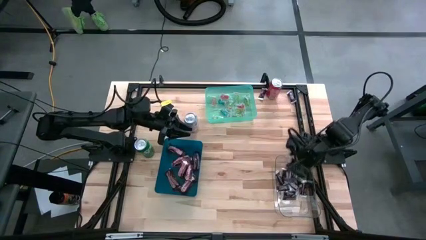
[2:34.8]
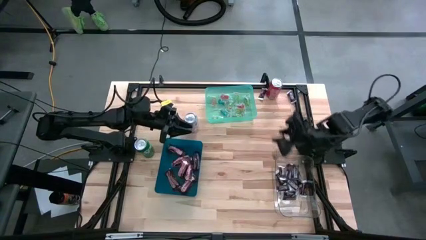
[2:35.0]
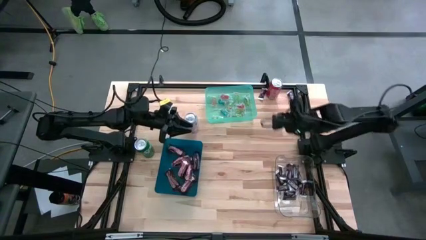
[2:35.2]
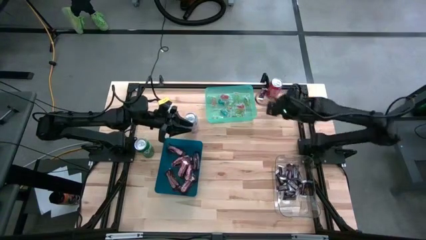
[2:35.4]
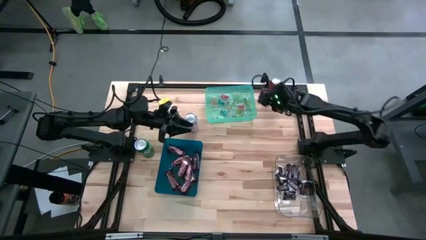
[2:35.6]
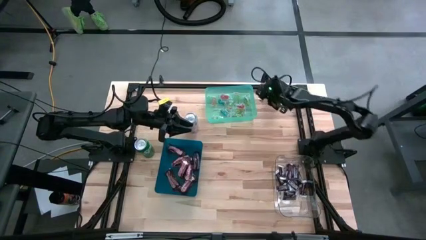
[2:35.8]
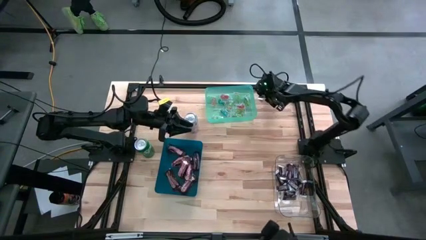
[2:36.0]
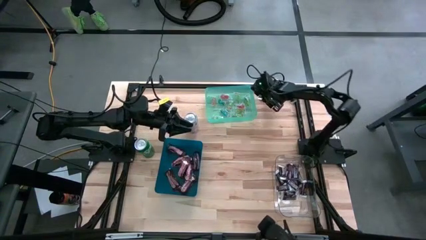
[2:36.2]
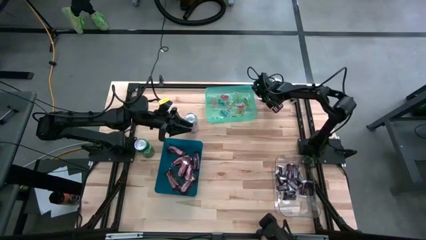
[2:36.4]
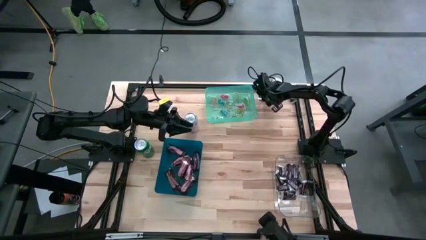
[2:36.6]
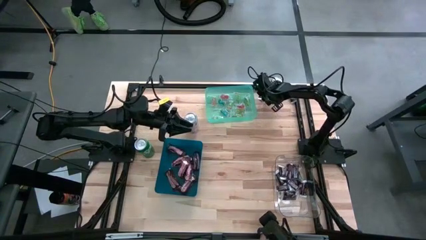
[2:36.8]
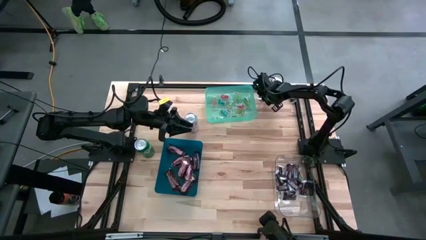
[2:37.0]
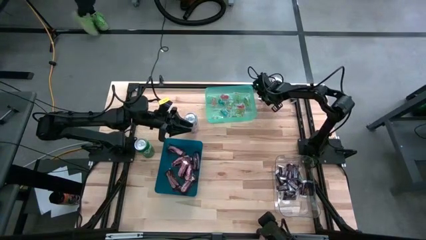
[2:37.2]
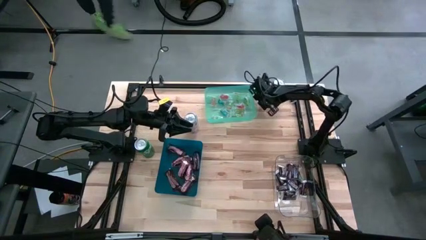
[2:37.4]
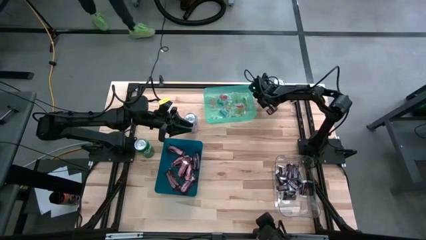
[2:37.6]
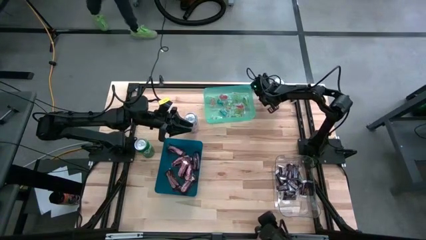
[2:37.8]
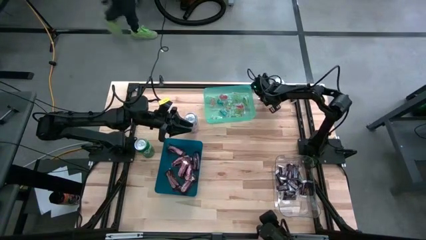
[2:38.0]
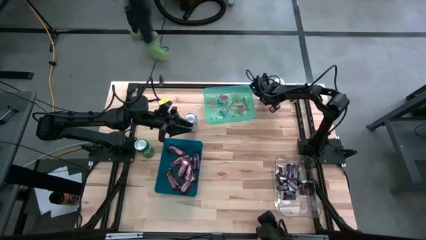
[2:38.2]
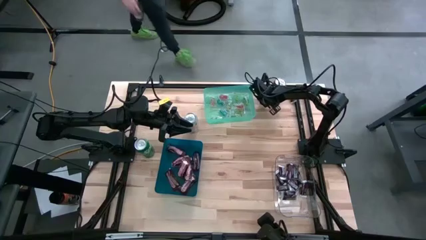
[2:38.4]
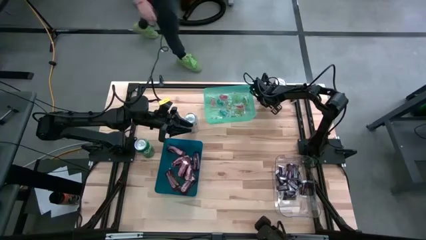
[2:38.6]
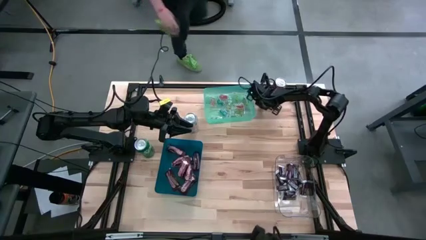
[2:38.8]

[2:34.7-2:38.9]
Task: Organize candy in baskets
Put the dark brown chocolate bar into the transparent bin

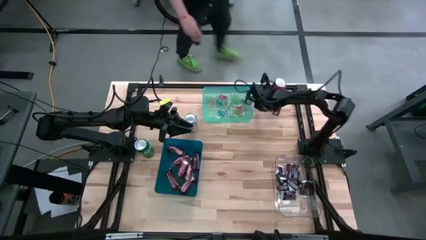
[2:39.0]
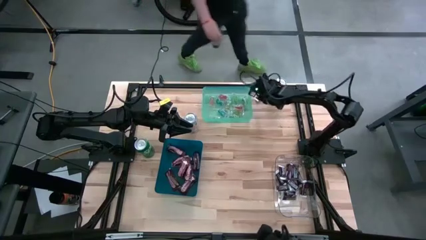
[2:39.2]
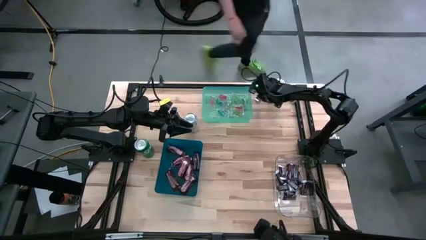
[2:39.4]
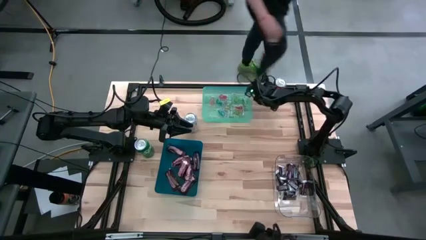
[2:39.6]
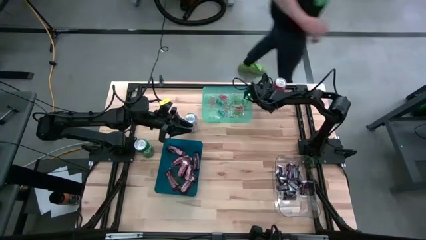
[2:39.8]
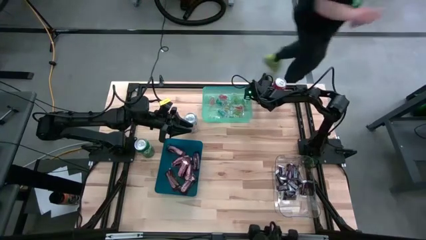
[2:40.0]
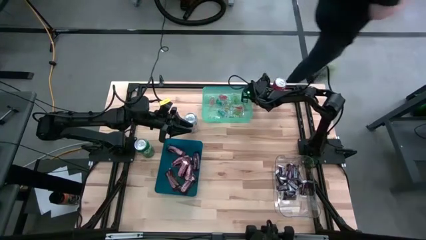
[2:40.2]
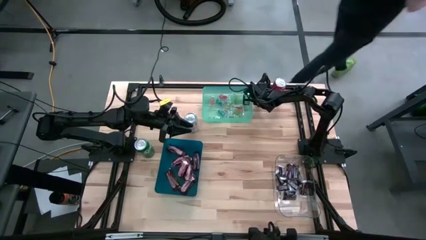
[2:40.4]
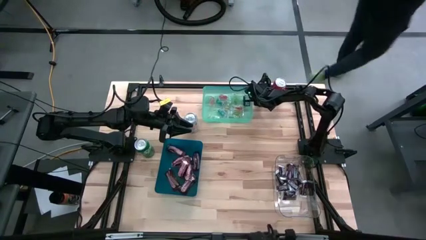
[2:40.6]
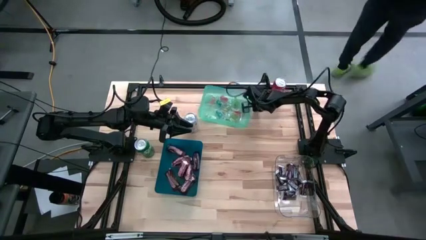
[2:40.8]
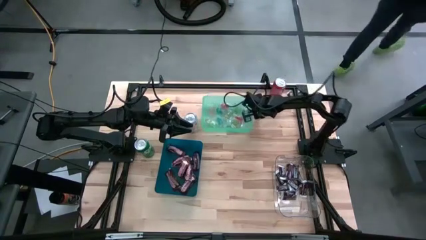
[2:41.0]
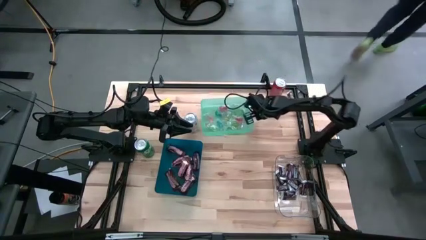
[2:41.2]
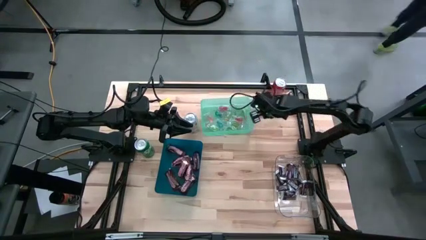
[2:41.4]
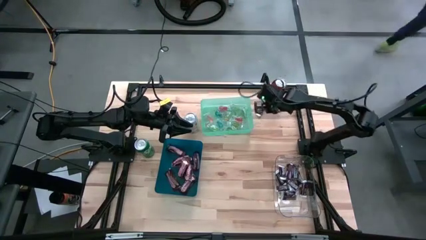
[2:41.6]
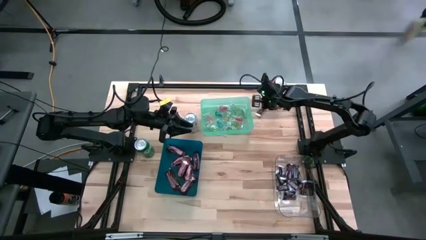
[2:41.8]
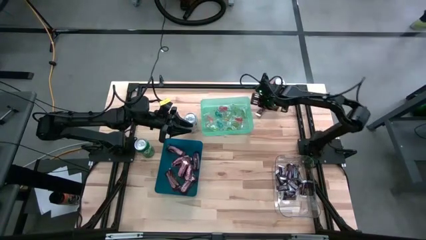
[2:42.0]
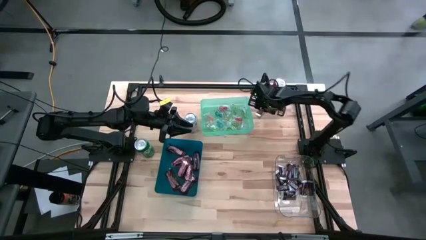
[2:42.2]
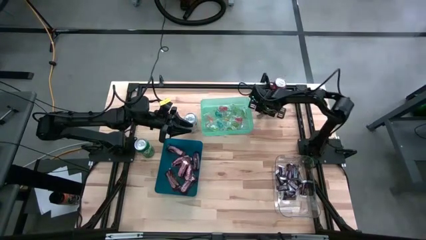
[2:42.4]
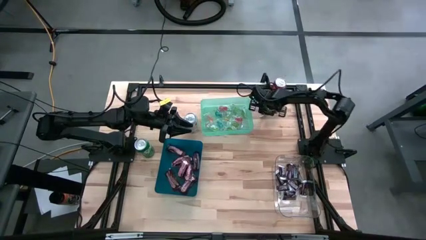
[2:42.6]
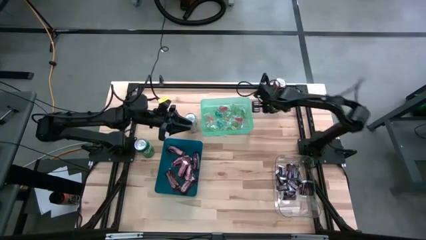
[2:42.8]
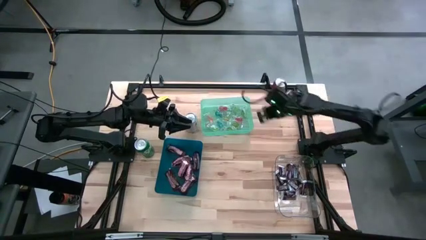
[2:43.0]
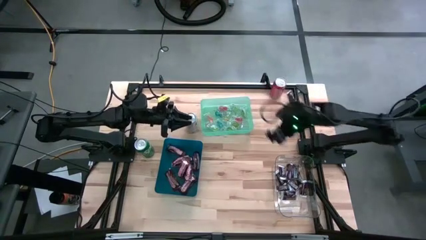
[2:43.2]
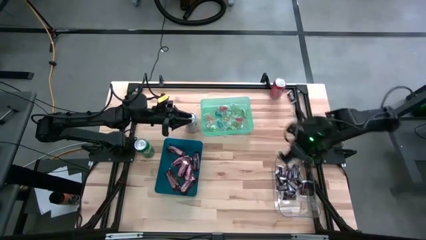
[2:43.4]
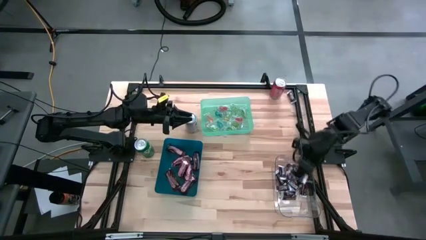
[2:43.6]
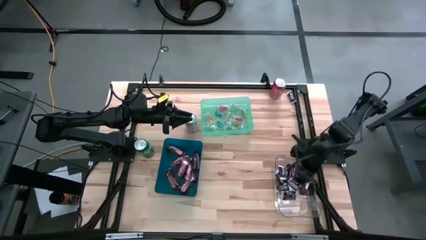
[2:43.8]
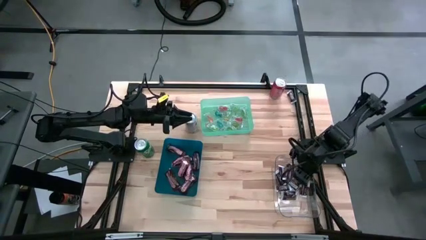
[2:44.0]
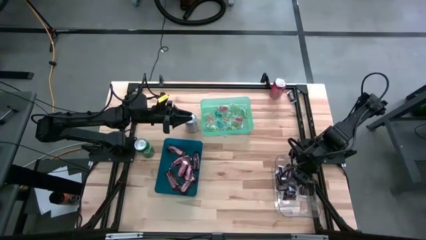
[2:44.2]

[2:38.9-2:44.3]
Put the dark brown chocolate bar into the transparent bin

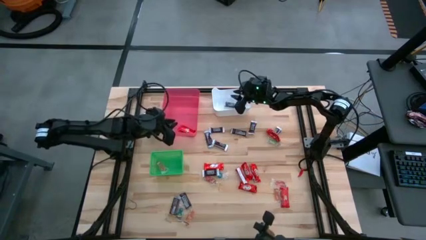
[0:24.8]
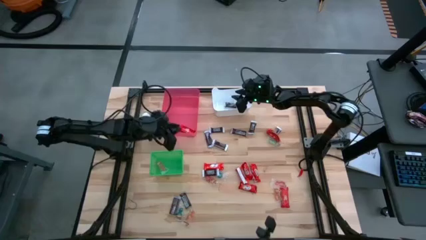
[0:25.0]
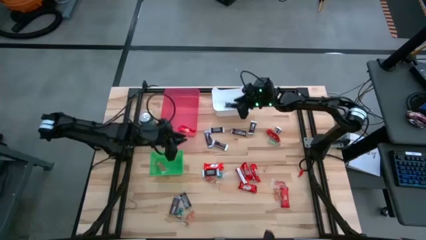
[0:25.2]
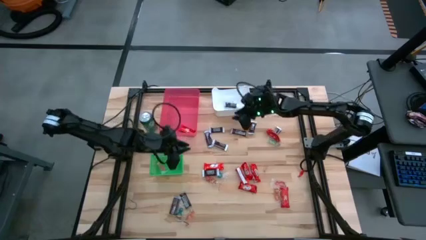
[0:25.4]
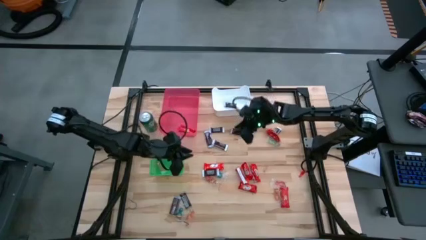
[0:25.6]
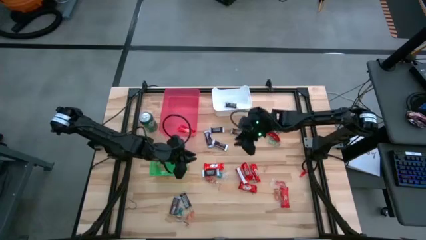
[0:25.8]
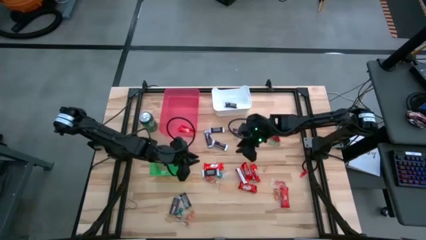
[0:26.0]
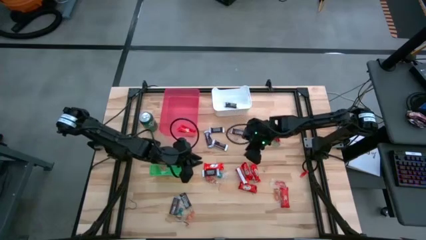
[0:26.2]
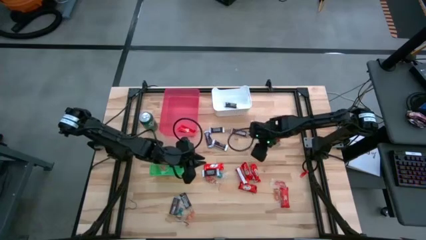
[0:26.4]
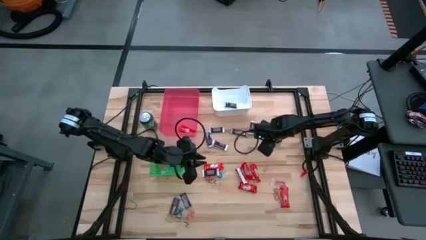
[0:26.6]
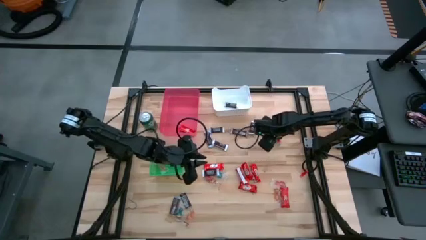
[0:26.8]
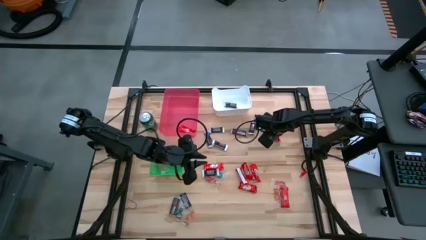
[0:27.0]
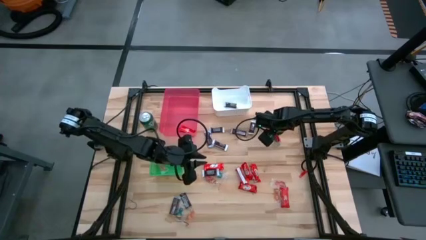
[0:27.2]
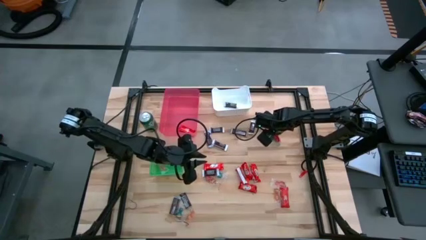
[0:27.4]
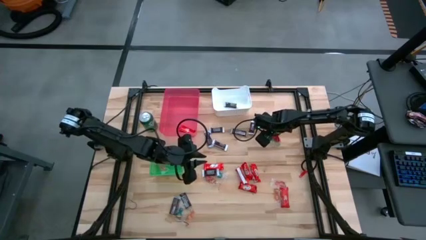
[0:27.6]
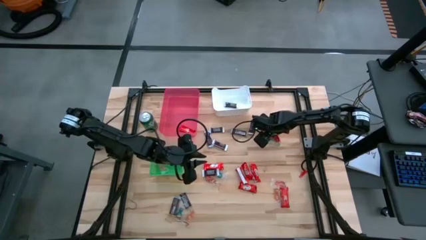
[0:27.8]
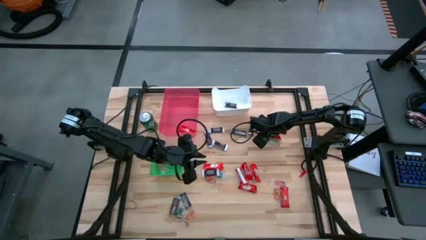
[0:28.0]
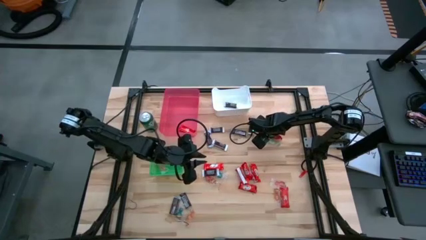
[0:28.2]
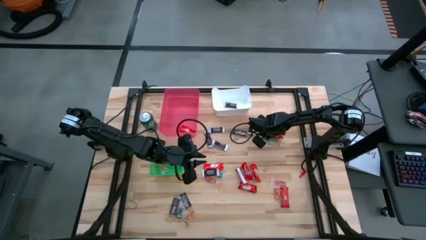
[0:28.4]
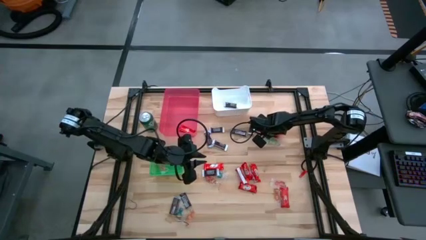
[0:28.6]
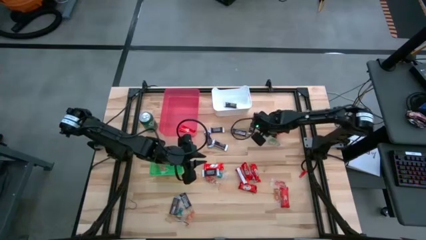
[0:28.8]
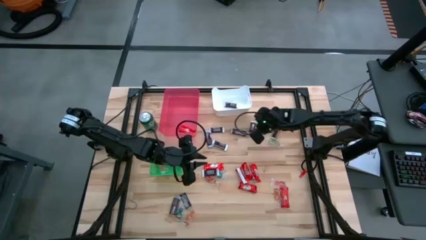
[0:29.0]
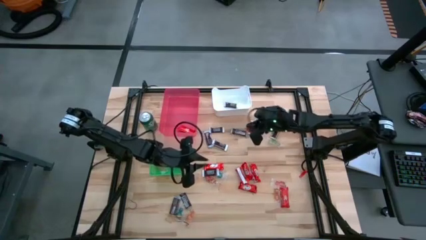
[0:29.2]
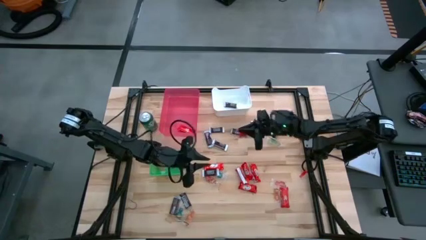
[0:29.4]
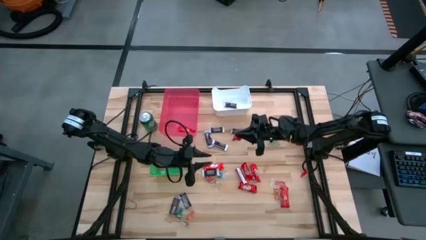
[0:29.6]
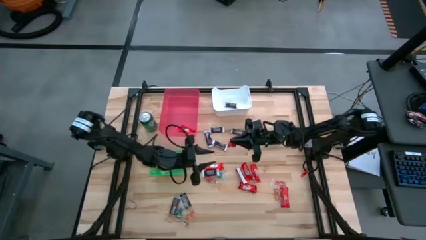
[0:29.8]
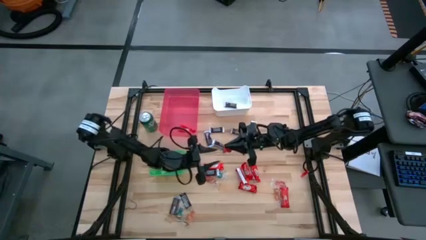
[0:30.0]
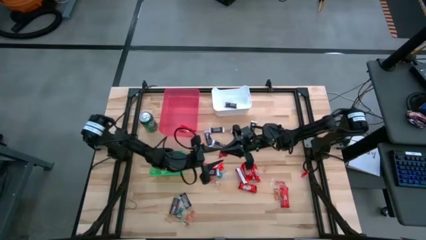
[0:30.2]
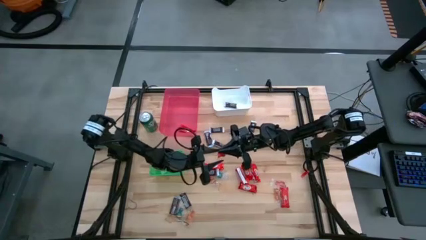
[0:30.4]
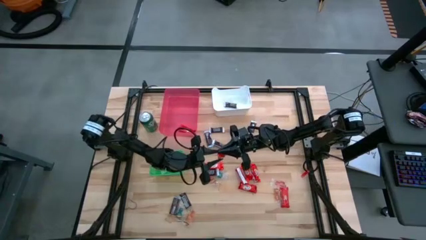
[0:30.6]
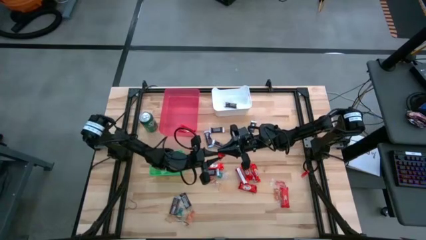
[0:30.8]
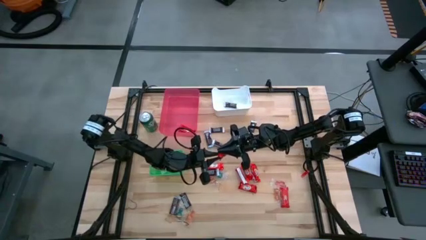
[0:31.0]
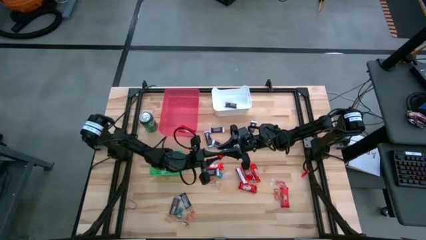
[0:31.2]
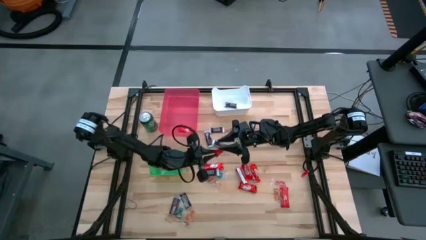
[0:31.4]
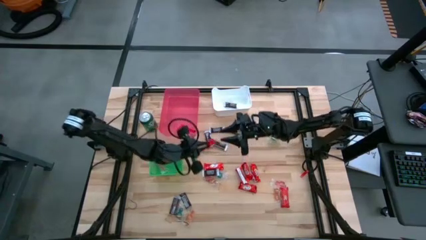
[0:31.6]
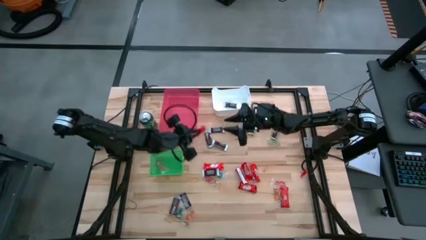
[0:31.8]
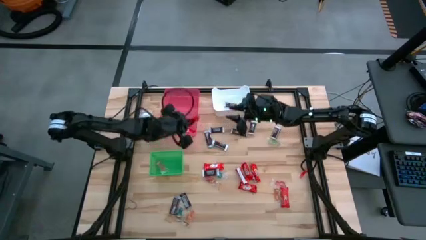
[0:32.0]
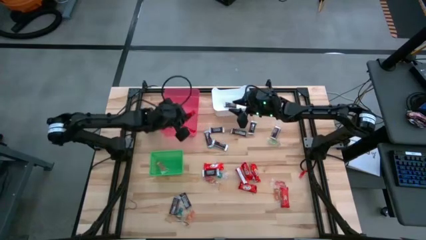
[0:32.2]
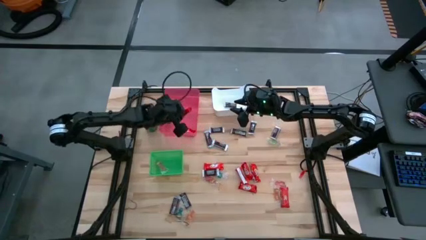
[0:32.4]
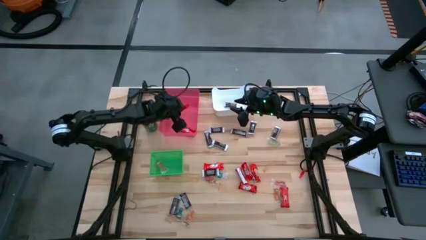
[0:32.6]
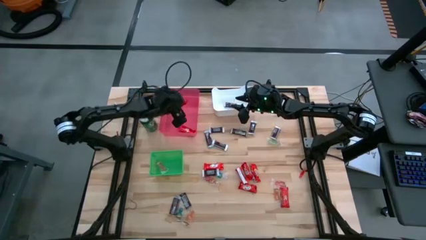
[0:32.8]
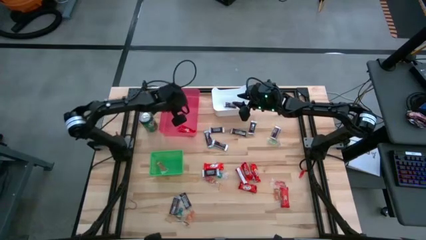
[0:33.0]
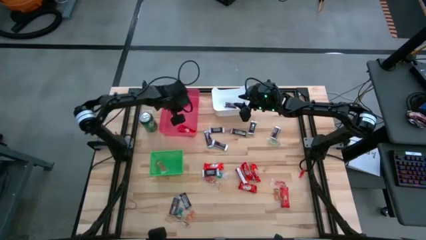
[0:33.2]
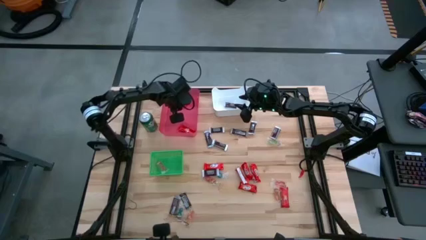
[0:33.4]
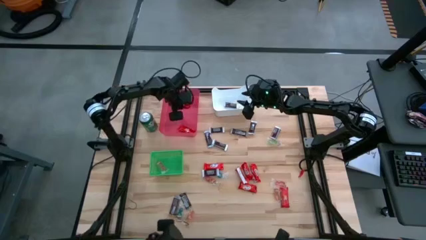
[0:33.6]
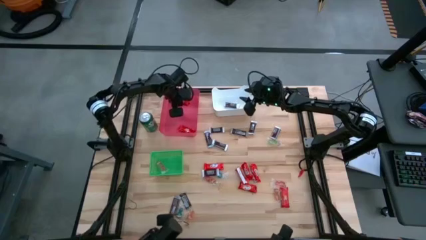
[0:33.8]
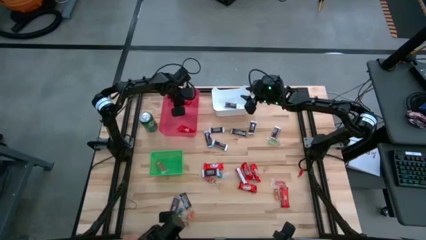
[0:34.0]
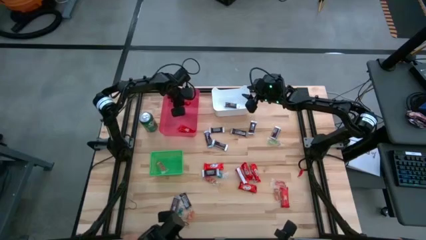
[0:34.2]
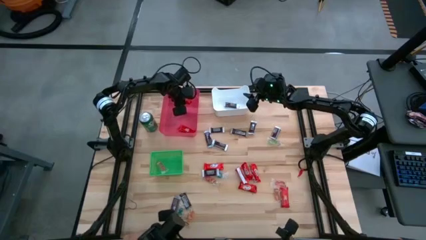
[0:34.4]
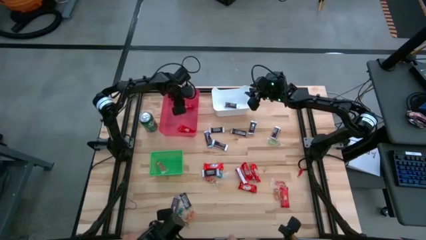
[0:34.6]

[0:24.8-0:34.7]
Task: Organize candy in baskets
Put the red chocolate into the pink bin
